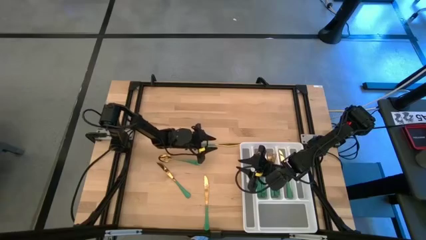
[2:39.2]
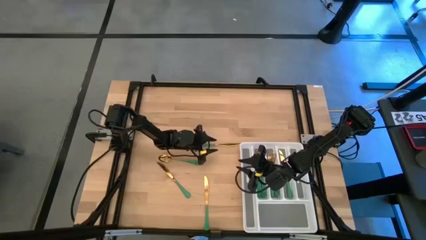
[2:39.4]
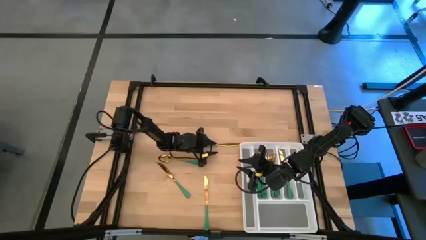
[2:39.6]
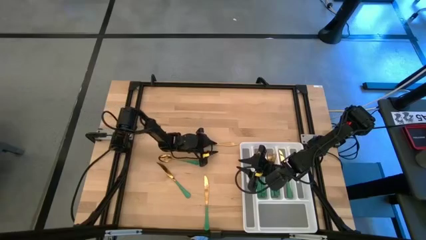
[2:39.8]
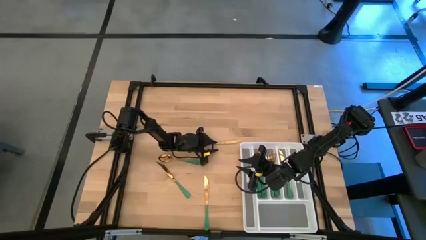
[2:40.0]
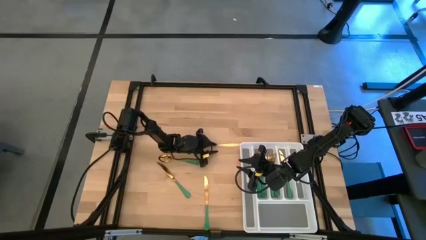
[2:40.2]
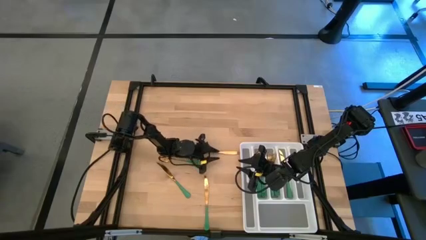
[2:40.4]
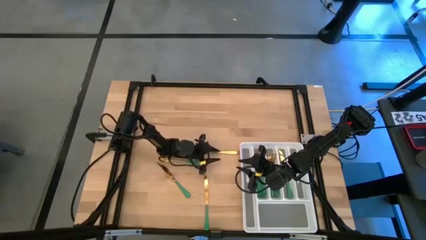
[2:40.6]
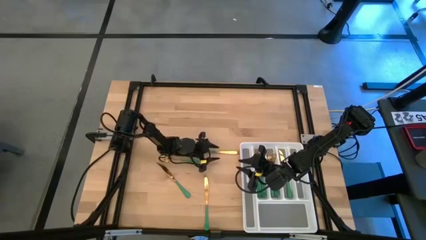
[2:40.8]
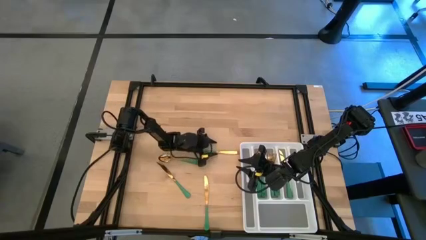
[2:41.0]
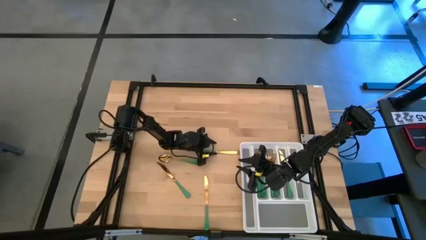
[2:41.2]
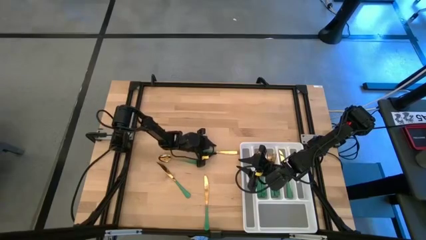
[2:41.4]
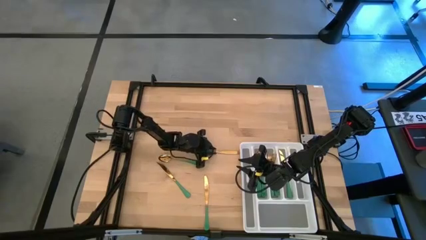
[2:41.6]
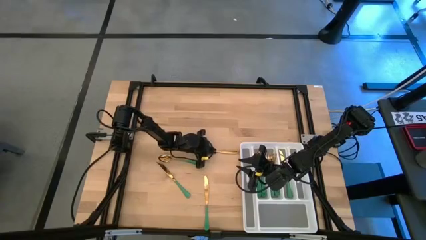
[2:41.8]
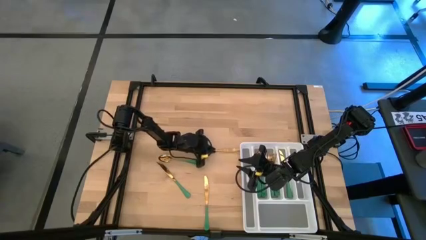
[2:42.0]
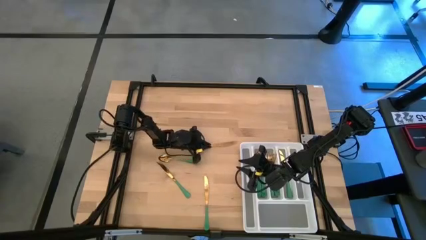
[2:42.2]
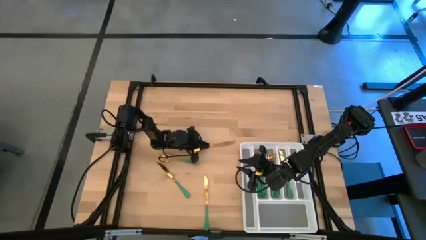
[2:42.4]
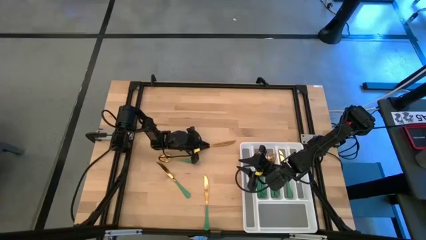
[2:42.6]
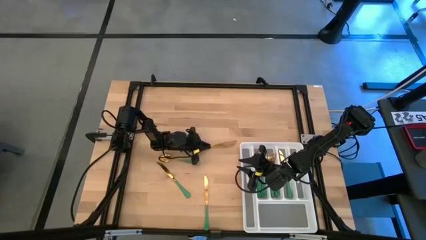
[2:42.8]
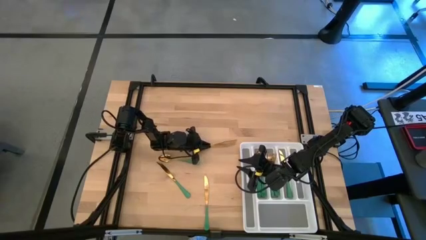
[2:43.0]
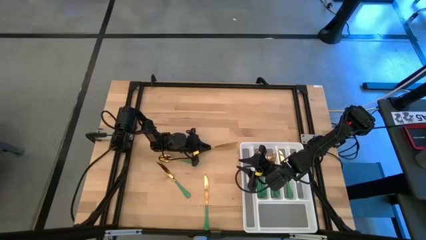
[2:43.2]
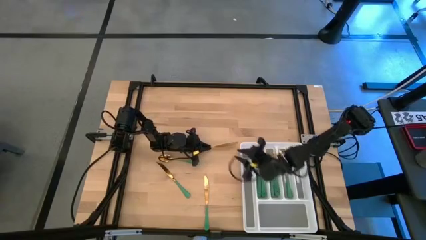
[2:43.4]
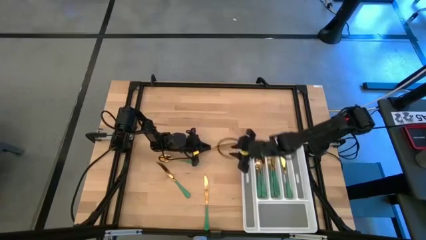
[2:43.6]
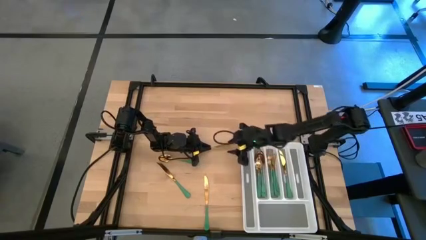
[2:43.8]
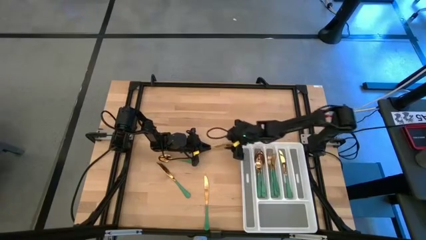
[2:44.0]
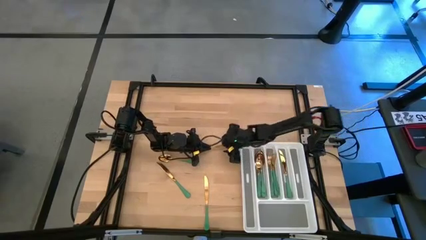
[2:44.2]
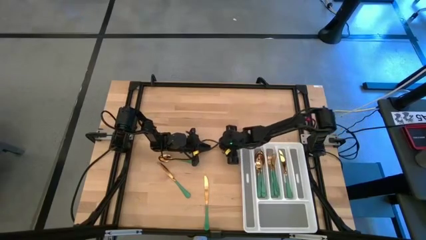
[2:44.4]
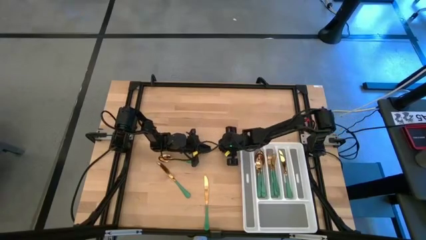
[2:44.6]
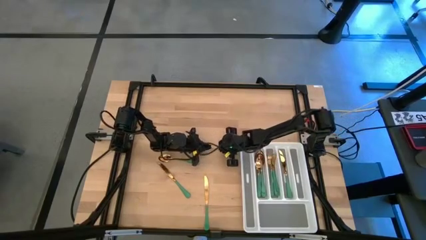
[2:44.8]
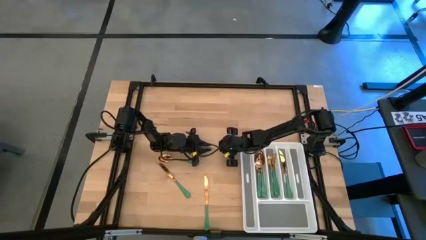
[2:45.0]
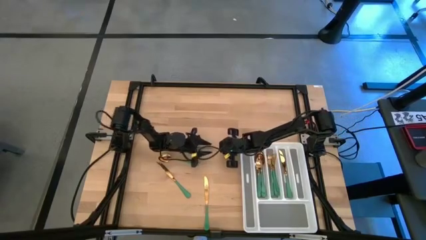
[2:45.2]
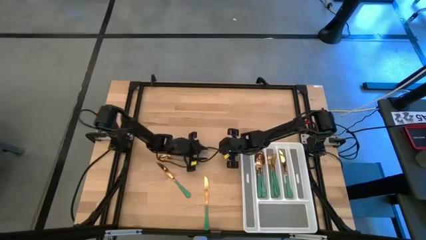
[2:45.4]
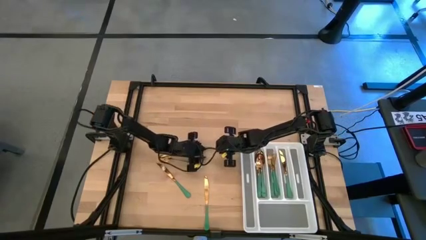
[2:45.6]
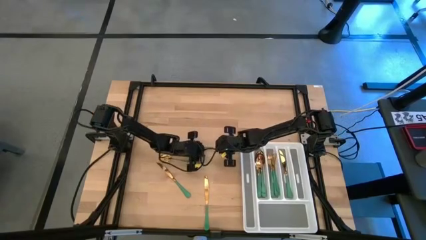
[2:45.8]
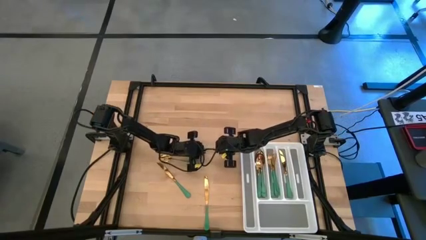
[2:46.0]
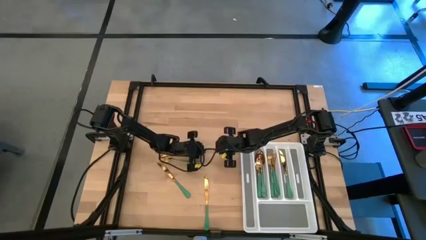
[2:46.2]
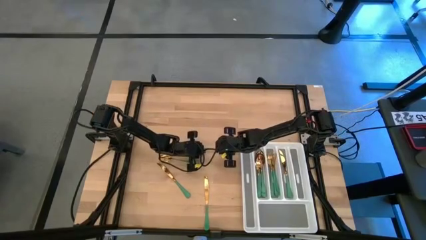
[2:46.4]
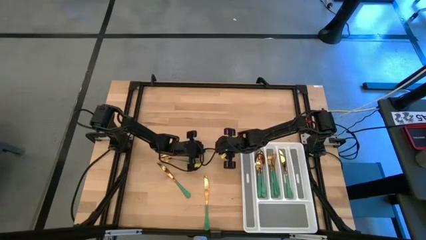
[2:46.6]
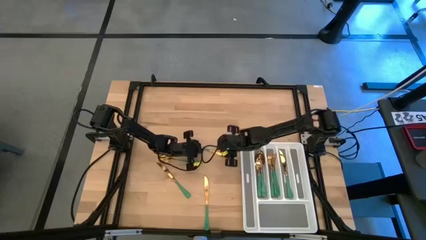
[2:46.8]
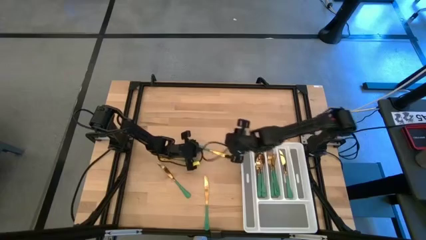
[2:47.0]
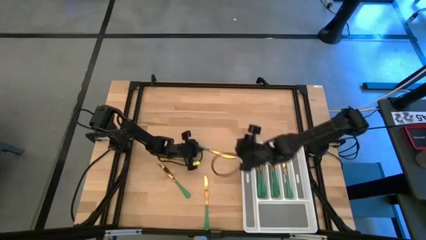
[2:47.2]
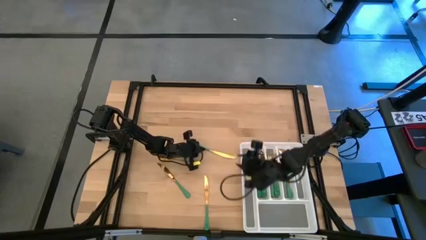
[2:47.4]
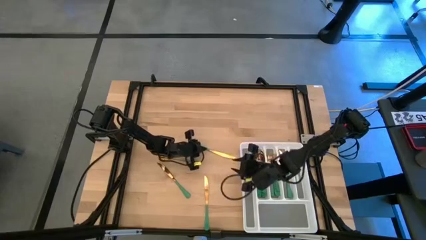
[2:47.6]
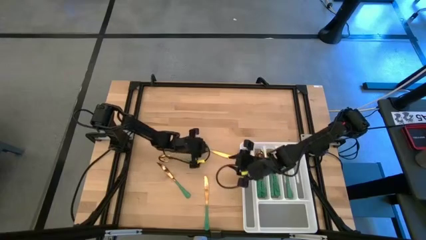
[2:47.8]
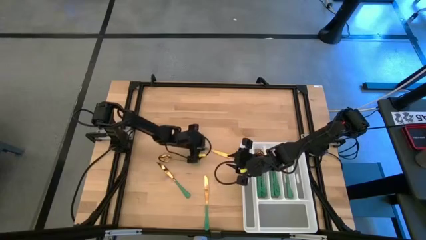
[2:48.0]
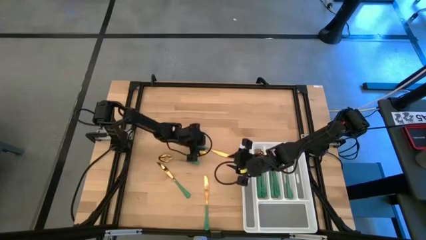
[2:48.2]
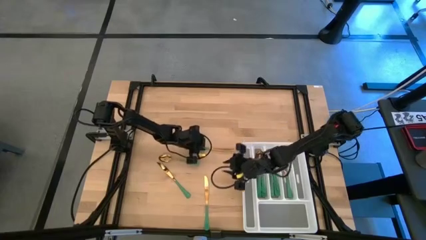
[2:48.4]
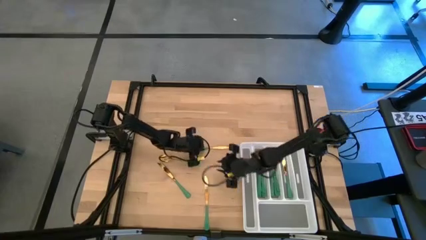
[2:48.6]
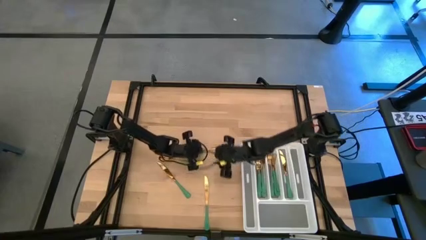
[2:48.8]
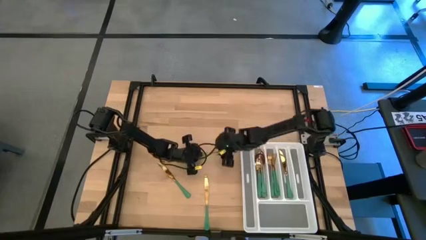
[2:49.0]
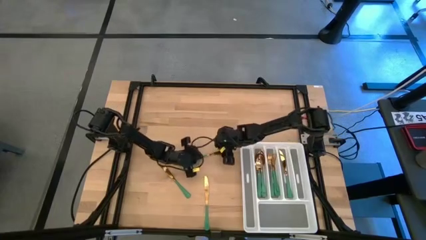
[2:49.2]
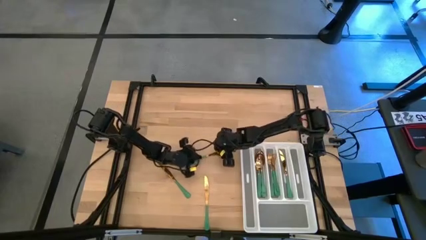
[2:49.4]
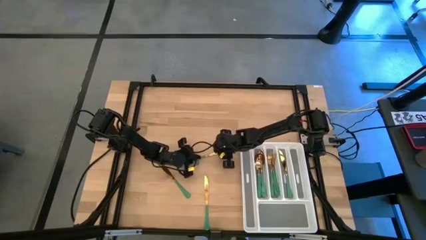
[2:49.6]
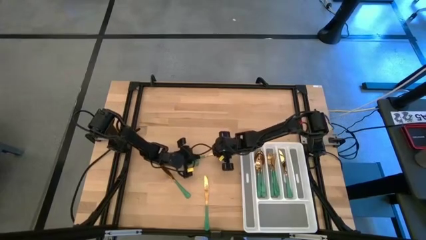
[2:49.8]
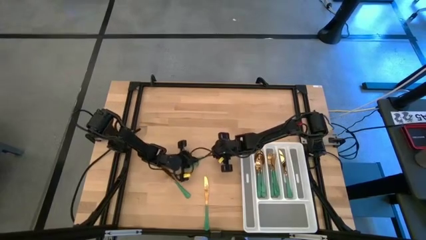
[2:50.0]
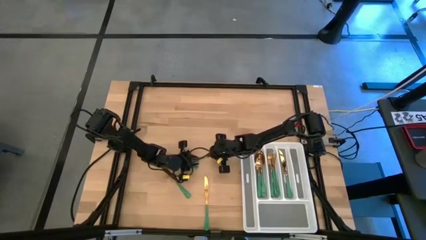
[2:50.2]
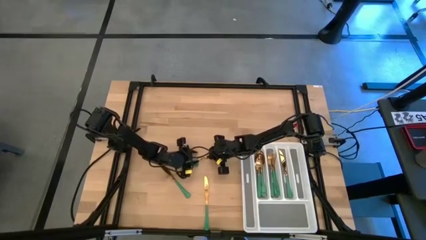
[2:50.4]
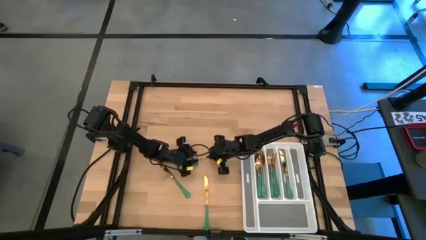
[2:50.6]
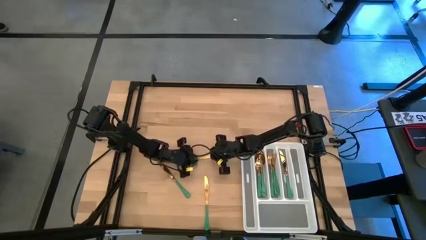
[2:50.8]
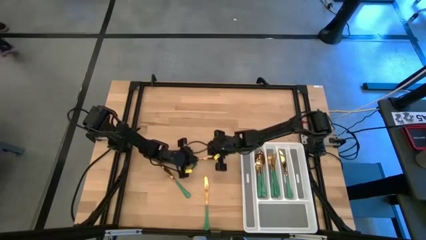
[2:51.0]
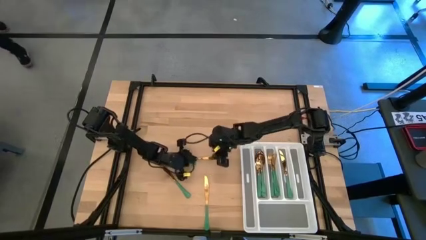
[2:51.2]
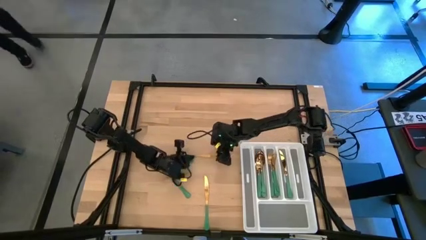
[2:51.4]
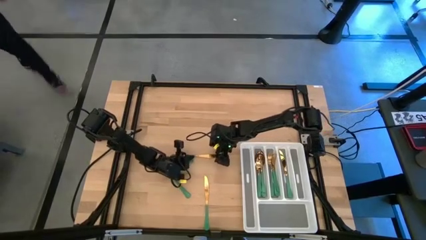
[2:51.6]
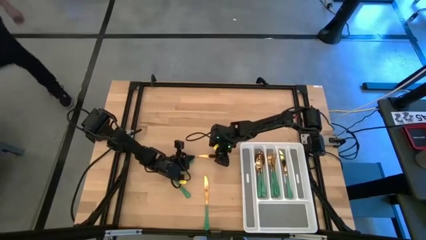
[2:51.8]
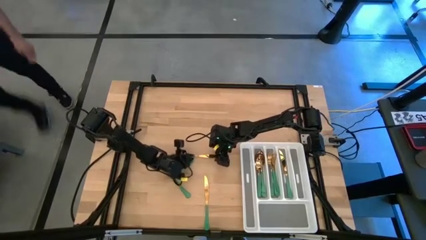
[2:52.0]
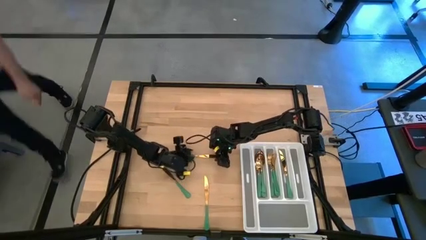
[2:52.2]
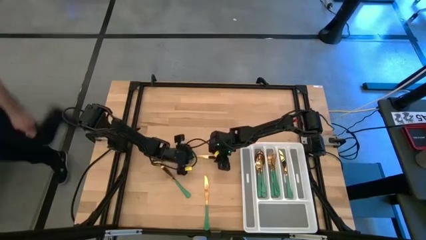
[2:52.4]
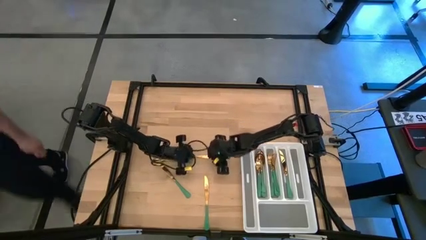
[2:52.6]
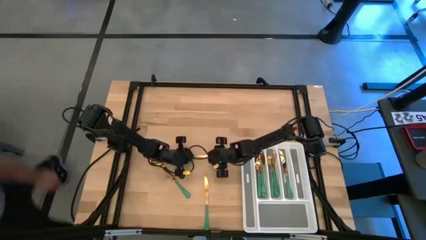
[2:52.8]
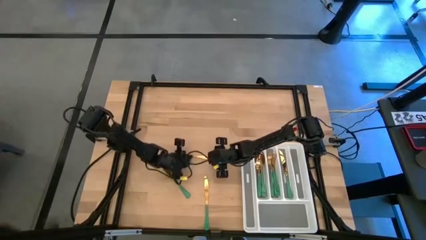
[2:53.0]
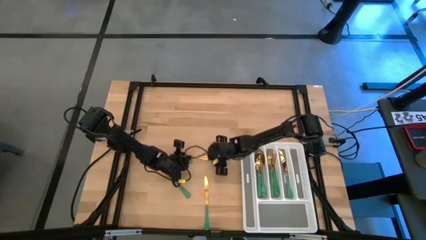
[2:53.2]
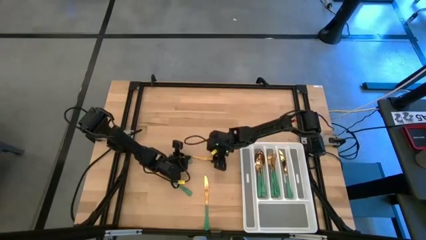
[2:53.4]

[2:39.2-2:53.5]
Task: Sort silverware
Put the top center green knife into the silverware rack
